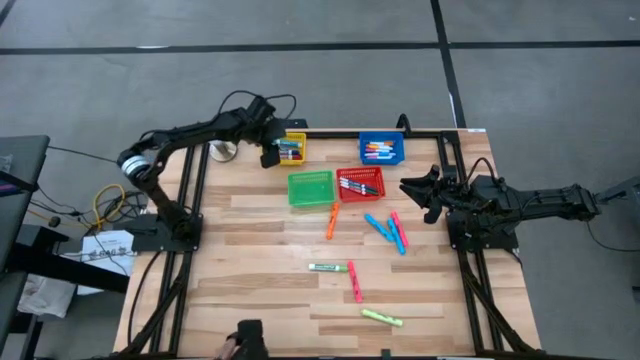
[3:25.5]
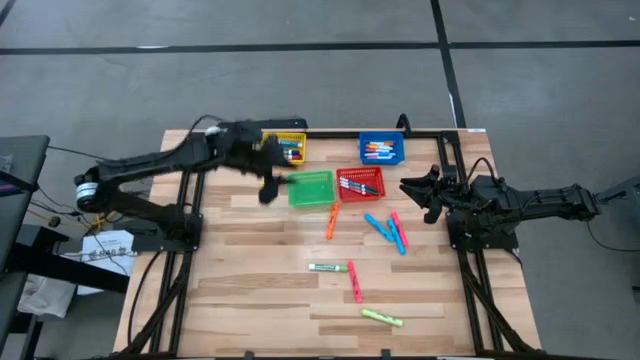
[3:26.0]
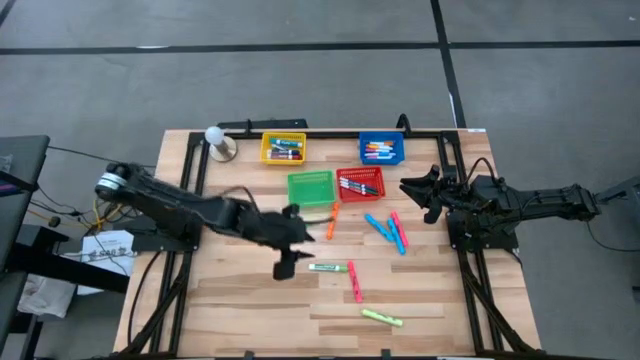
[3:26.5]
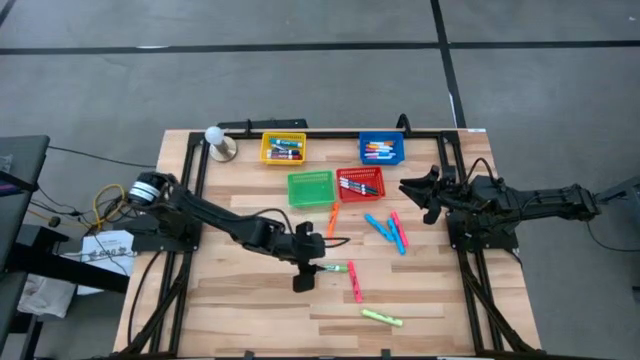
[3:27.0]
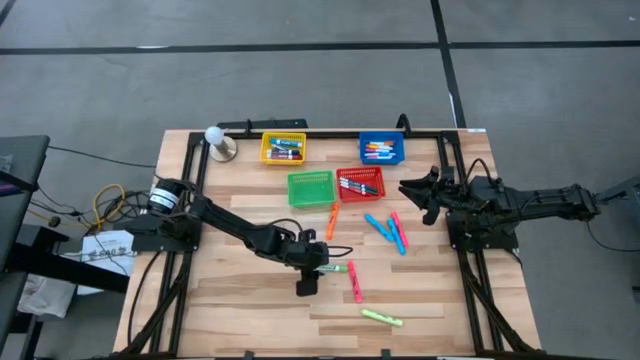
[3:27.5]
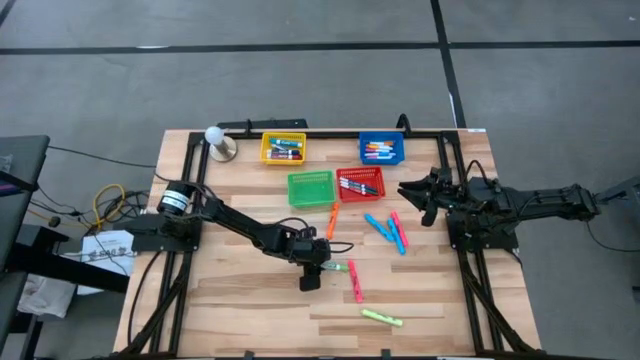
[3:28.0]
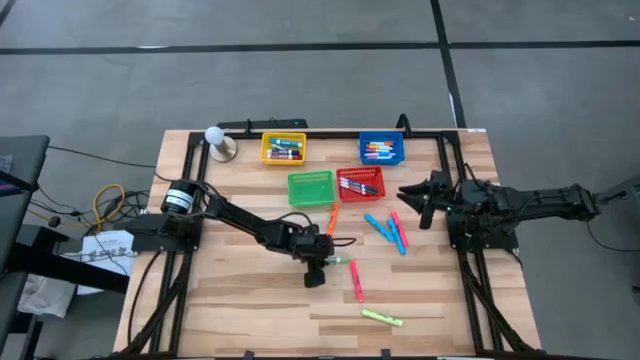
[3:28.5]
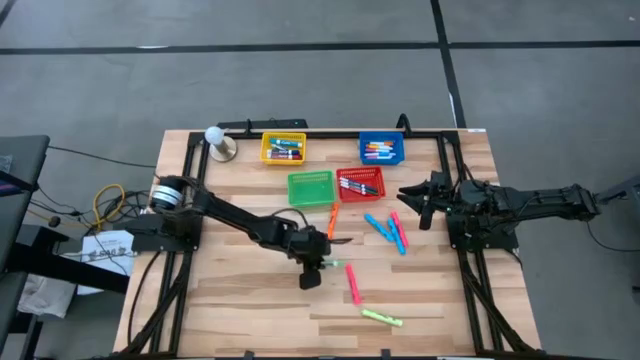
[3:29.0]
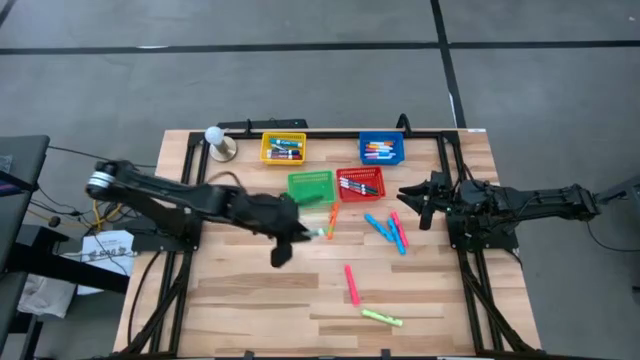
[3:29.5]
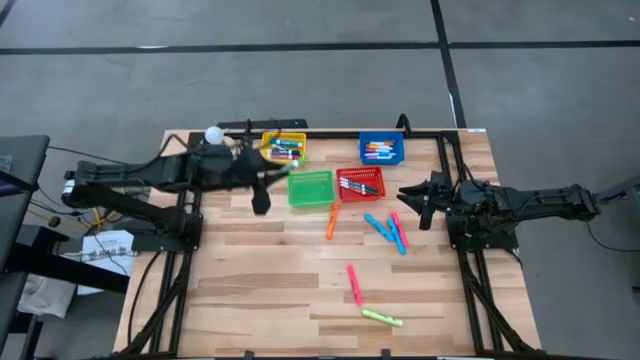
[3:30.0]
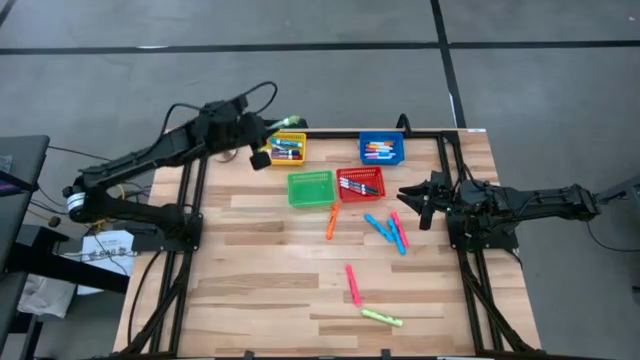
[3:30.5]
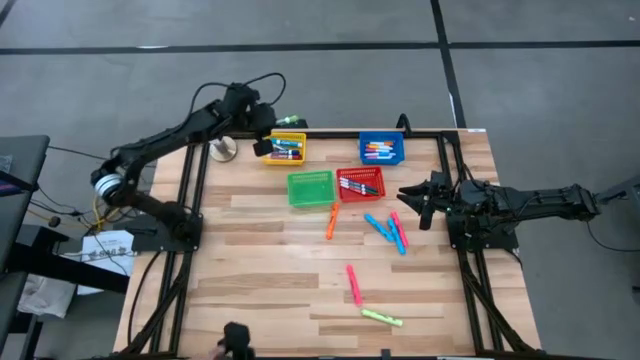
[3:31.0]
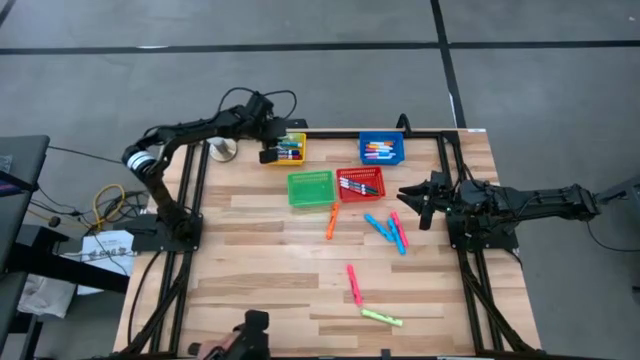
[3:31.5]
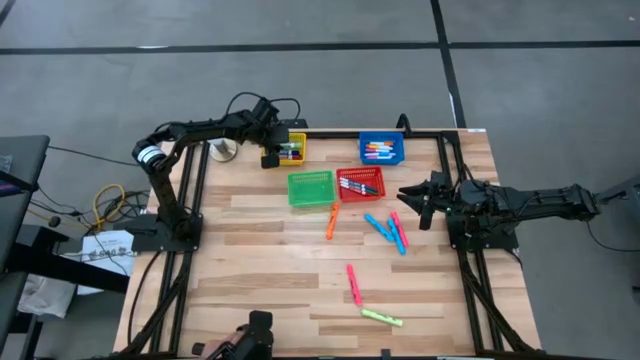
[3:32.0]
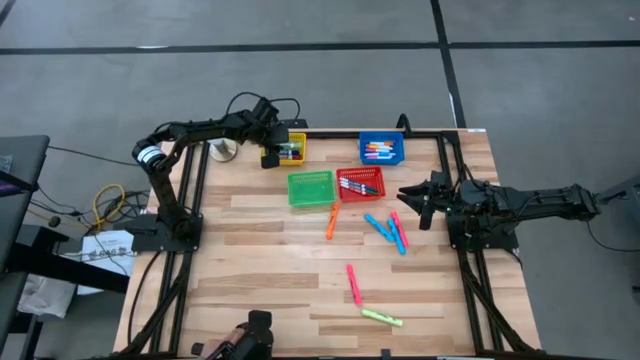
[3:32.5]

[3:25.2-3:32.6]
Task: Pick & Place Markers
Put the light green marker pen into the yellow bin

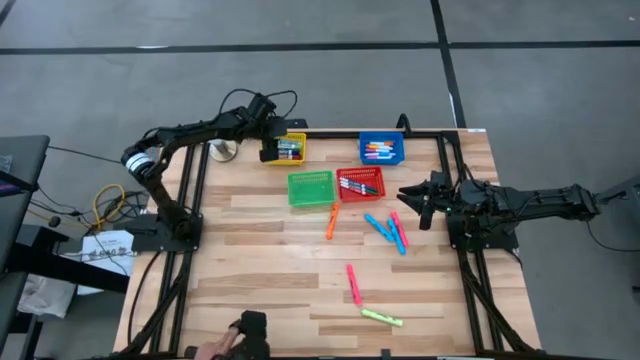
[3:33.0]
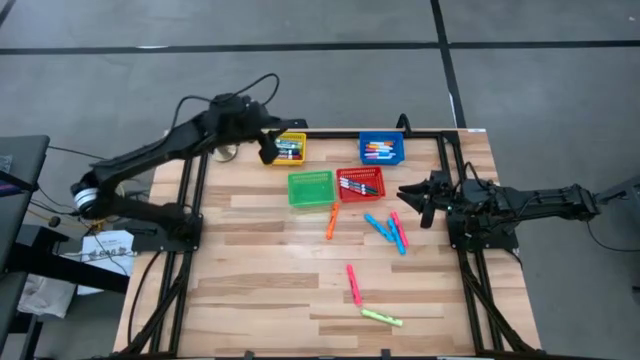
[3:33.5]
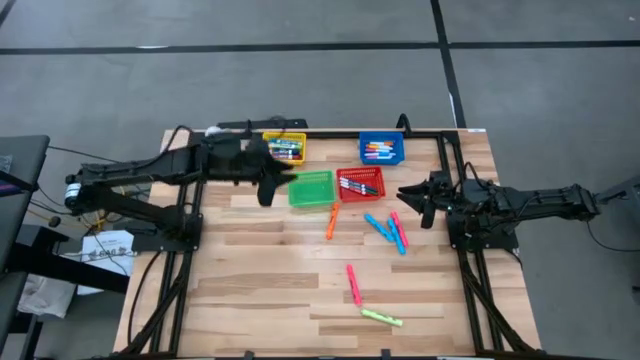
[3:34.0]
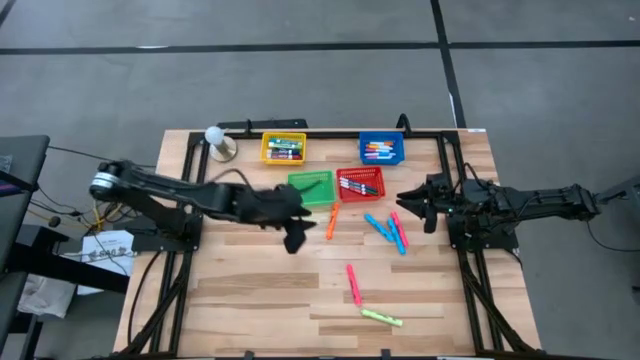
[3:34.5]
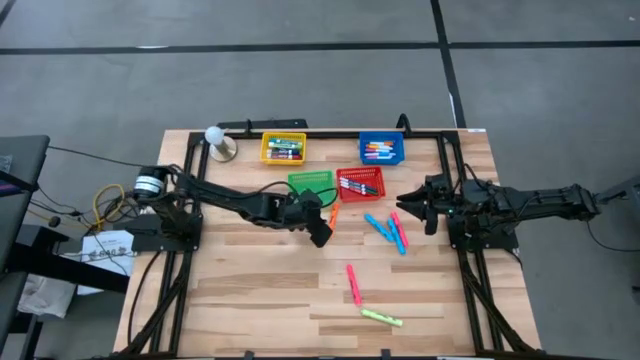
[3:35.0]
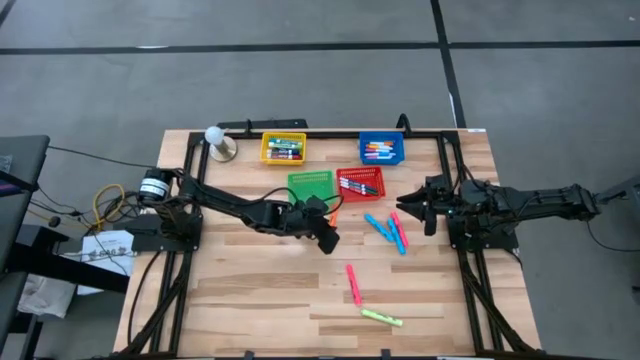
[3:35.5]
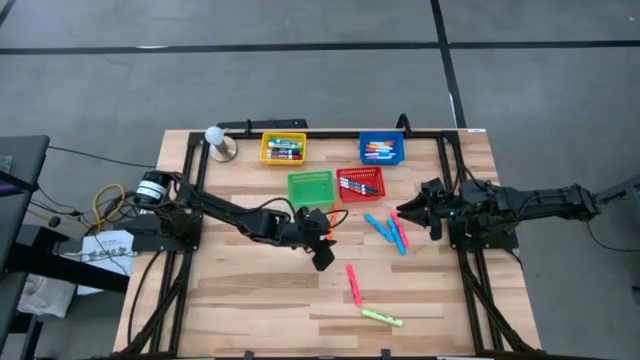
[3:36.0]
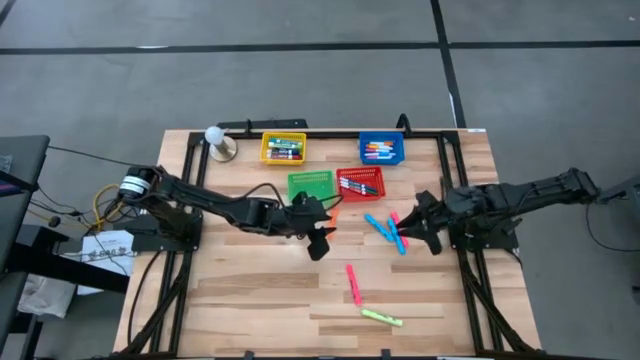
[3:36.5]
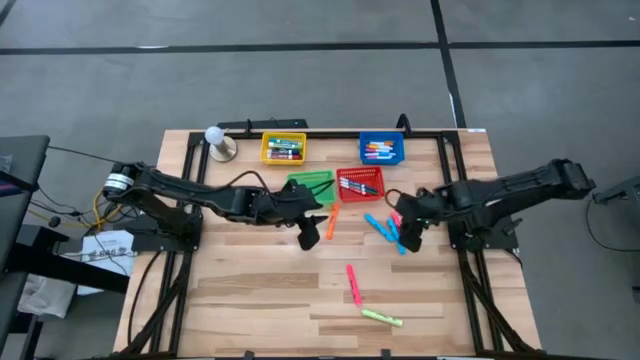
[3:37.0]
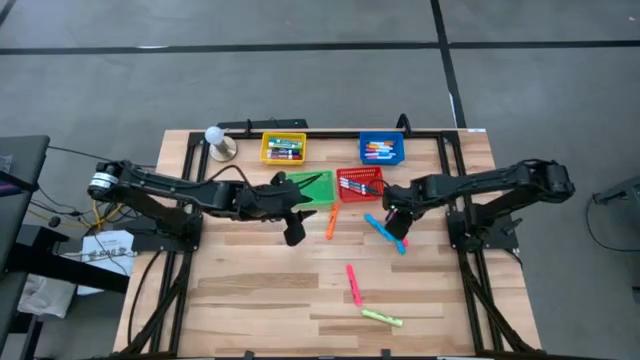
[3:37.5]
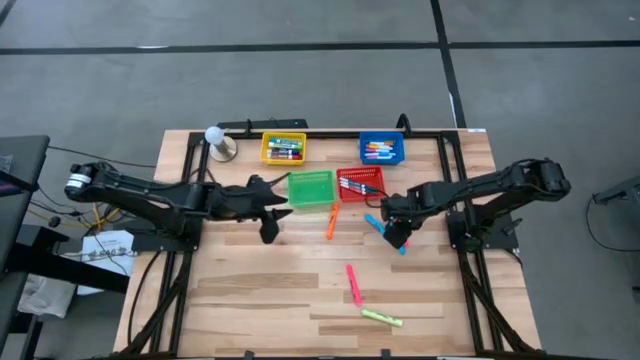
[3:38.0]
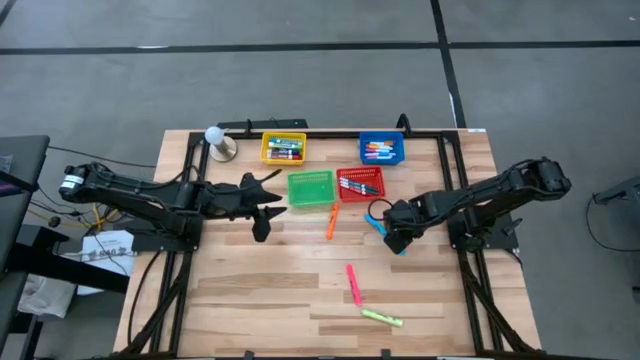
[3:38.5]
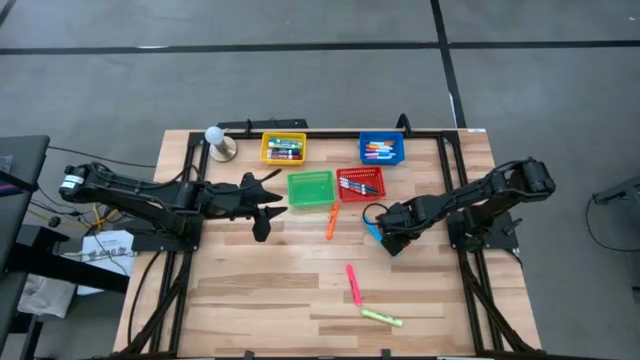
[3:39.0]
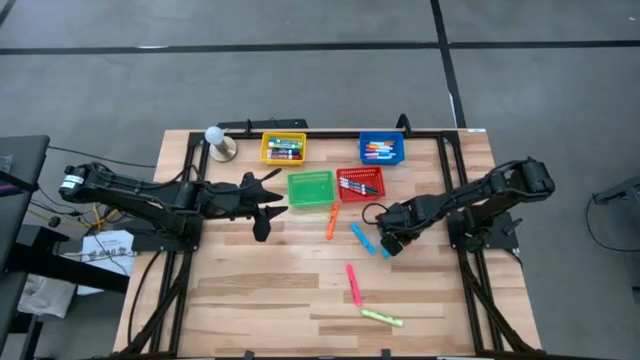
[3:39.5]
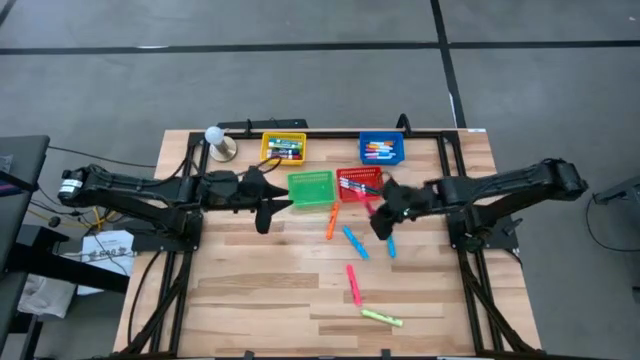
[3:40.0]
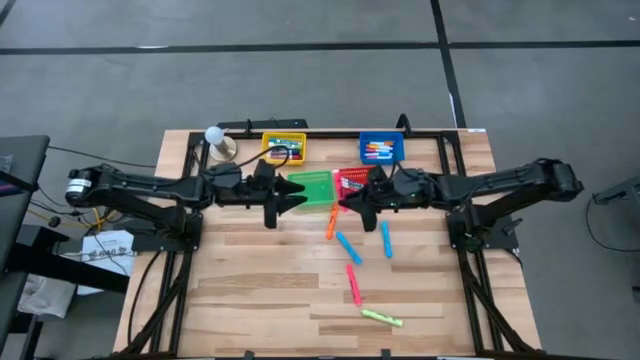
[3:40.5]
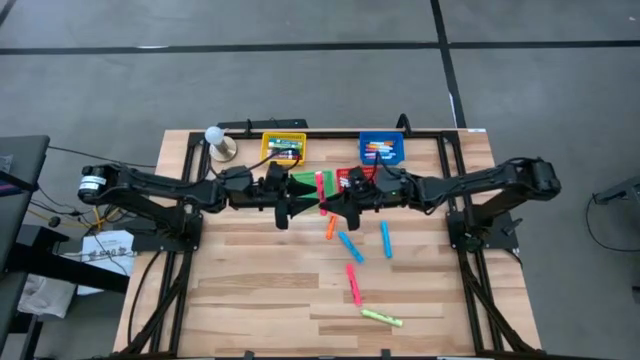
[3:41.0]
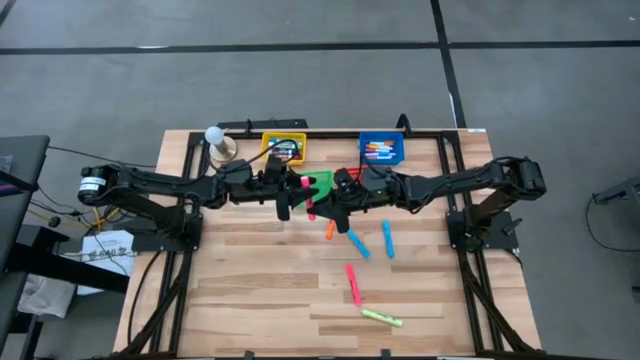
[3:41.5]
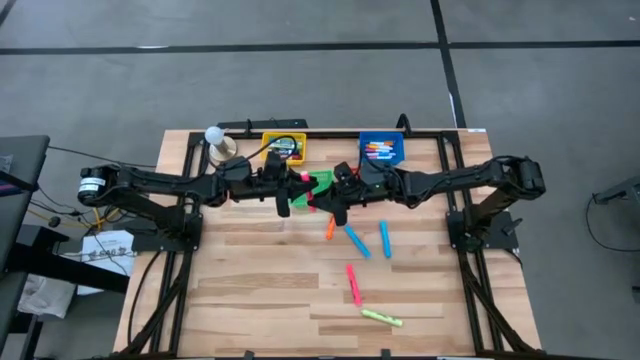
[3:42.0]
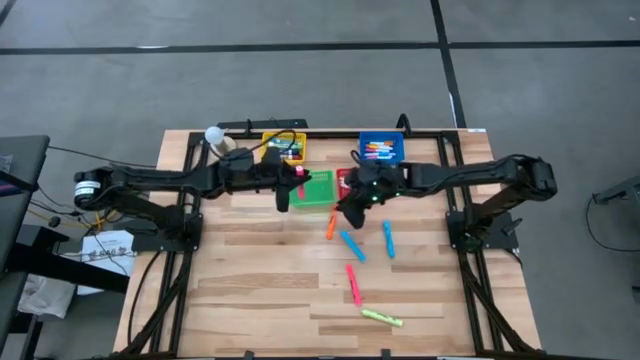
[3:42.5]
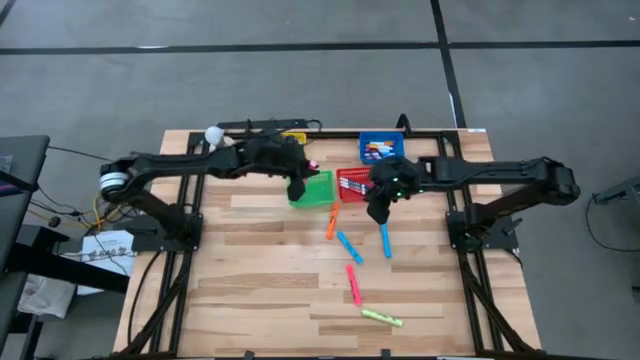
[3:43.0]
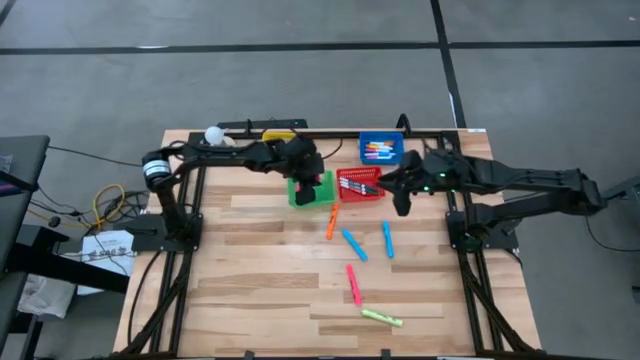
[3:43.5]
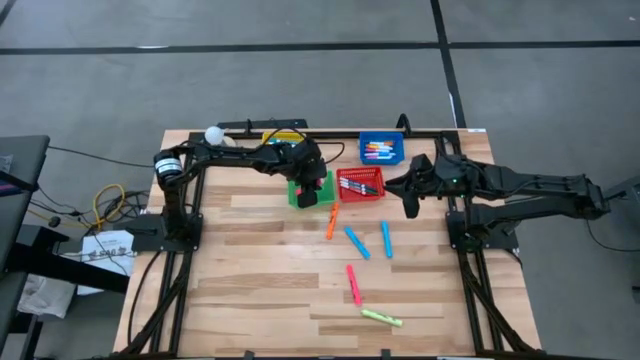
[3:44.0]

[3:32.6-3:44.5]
Put the top large pink highlighter pen into the green bin

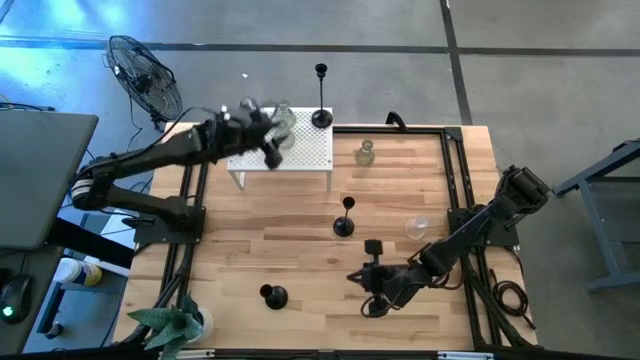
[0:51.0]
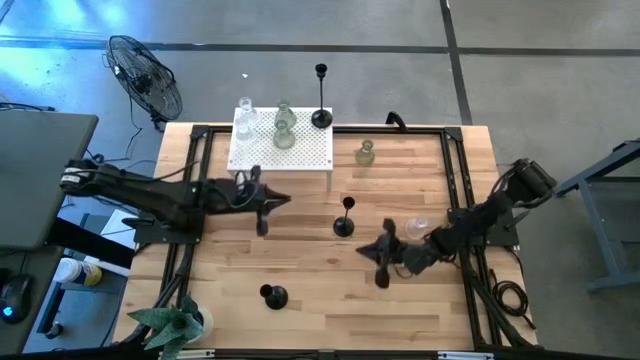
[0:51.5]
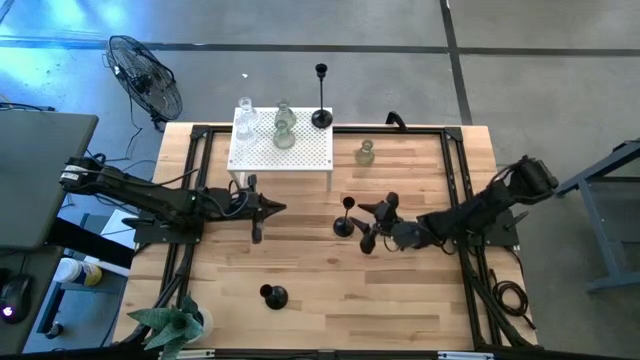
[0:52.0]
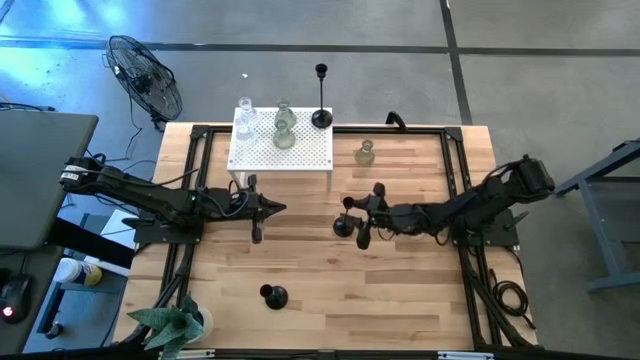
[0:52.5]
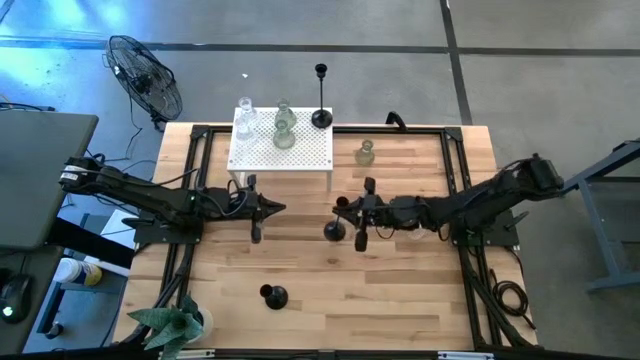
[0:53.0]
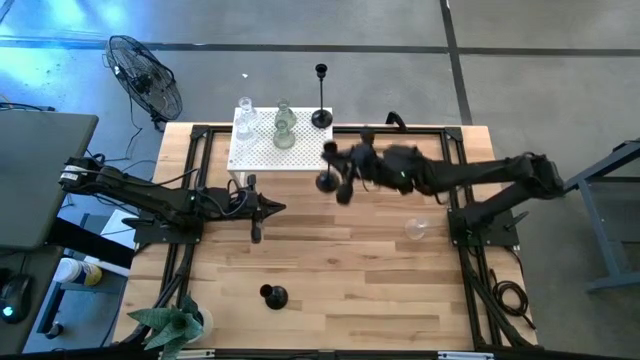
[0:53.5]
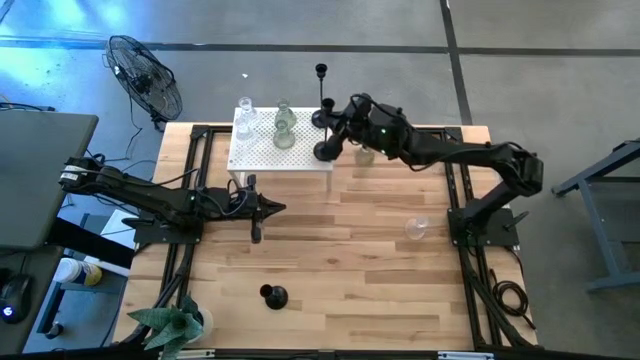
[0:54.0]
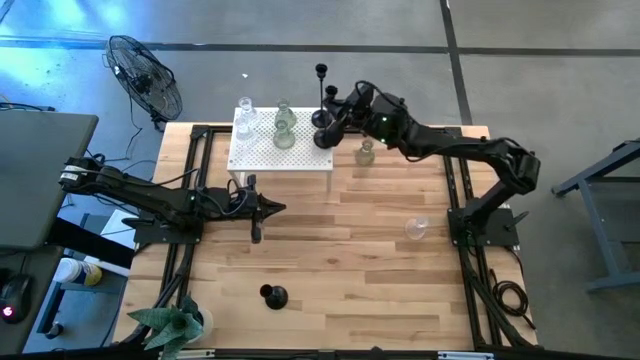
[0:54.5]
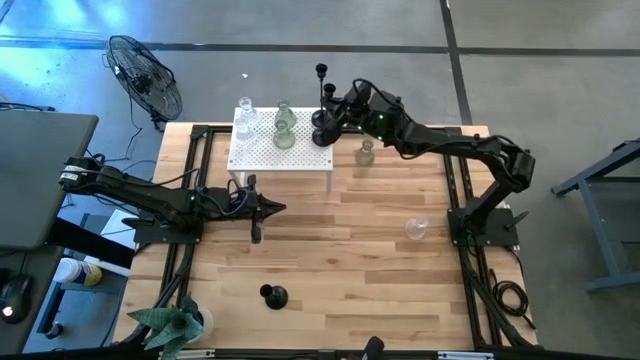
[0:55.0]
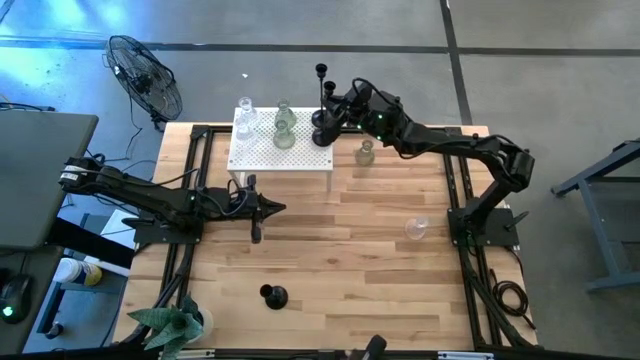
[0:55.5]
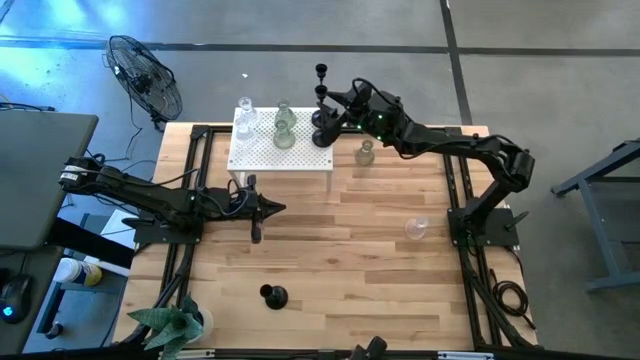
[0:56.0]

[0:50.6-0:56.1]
Task: Pick & Place candle stick holders
Align the top black candle holder with the other black candle holder on the shelf
